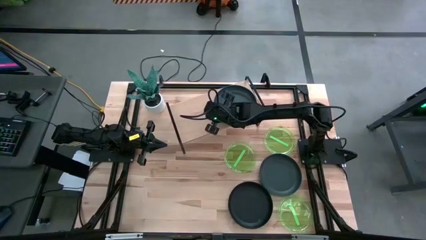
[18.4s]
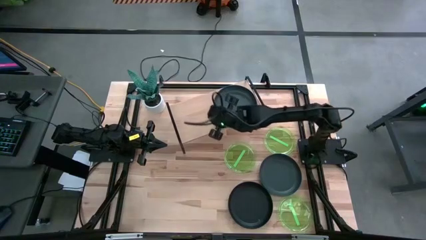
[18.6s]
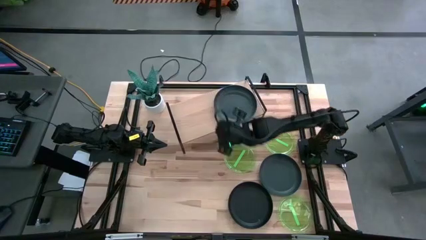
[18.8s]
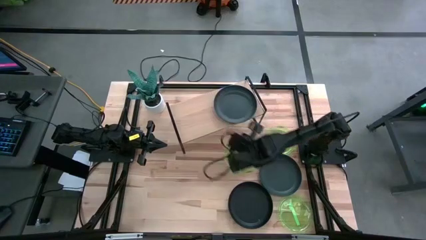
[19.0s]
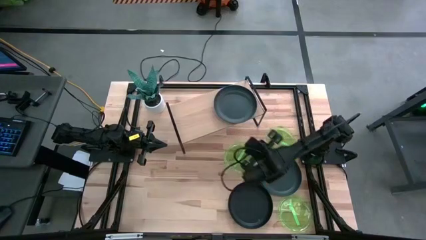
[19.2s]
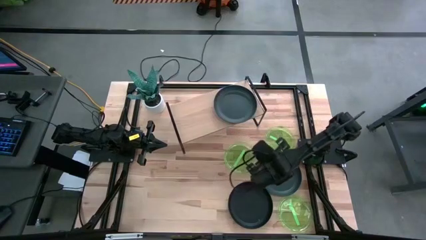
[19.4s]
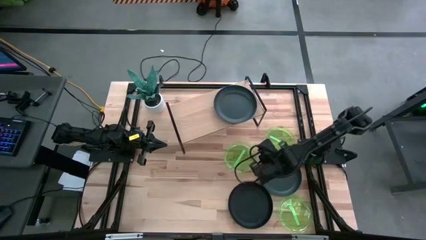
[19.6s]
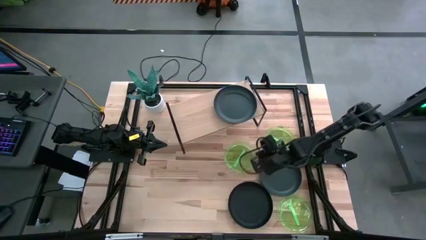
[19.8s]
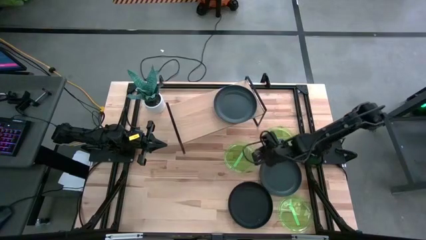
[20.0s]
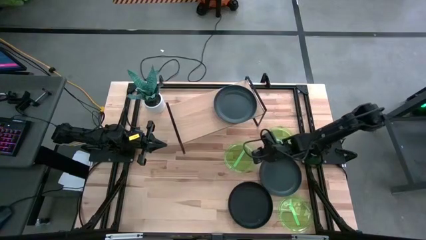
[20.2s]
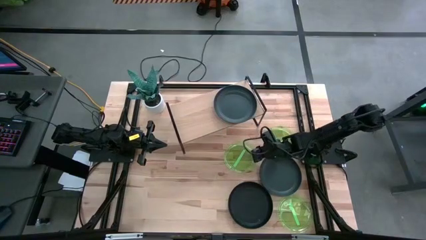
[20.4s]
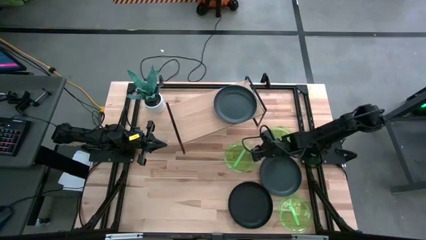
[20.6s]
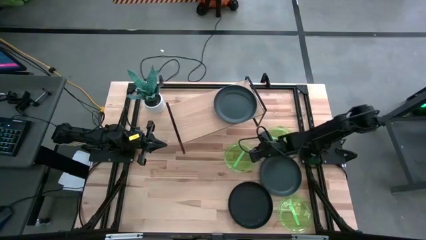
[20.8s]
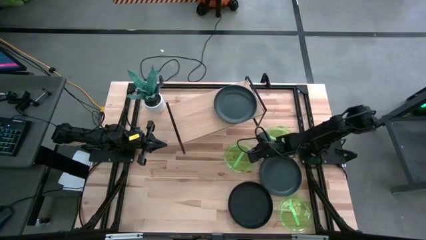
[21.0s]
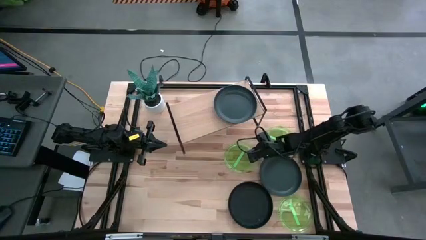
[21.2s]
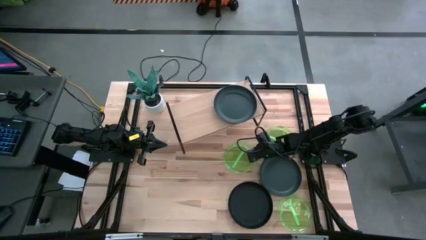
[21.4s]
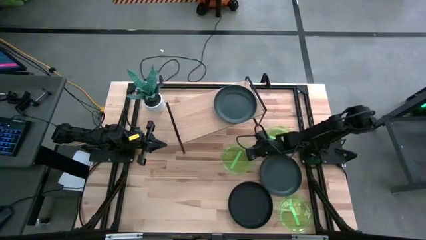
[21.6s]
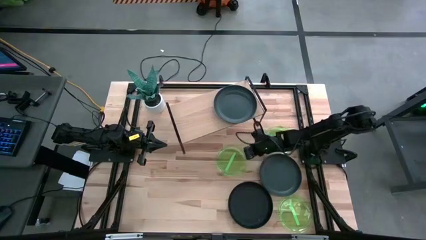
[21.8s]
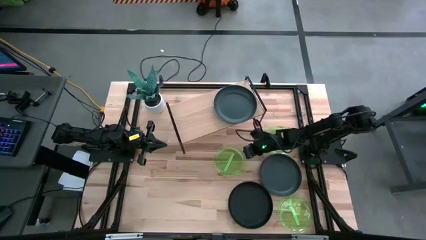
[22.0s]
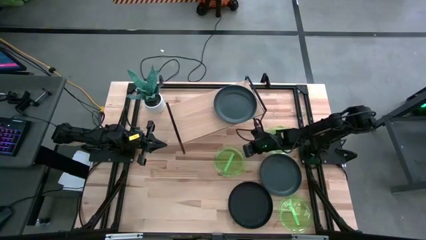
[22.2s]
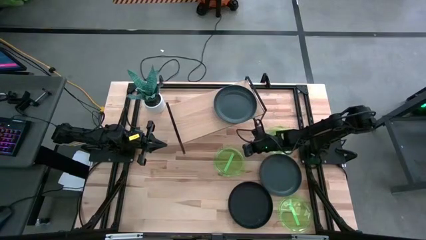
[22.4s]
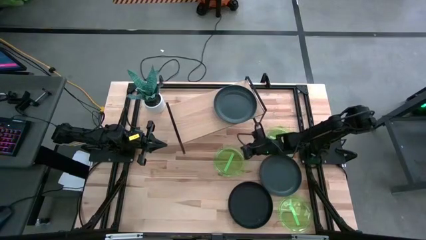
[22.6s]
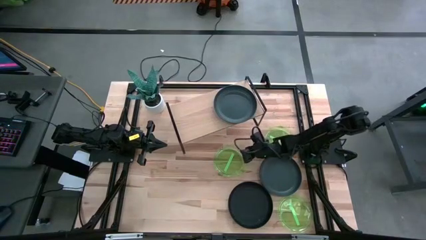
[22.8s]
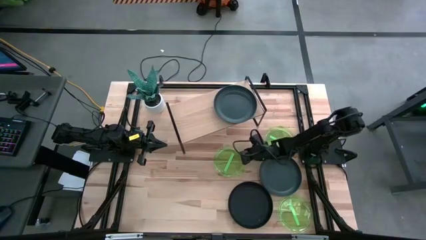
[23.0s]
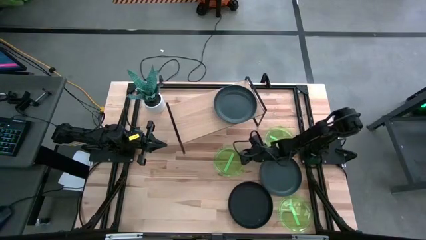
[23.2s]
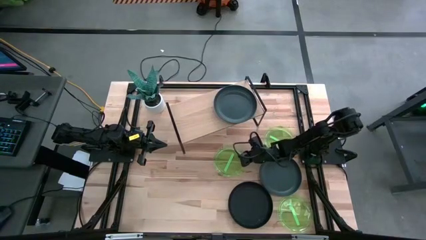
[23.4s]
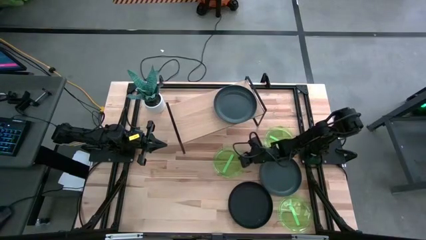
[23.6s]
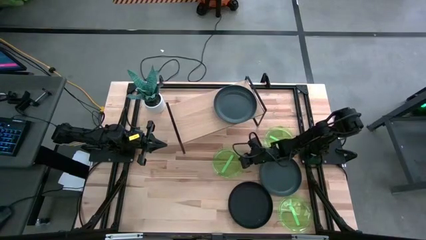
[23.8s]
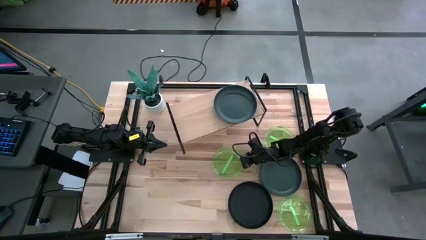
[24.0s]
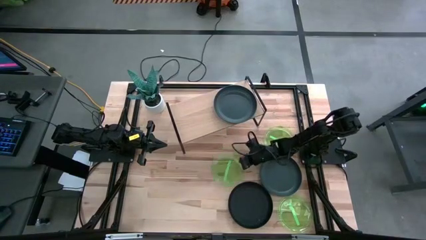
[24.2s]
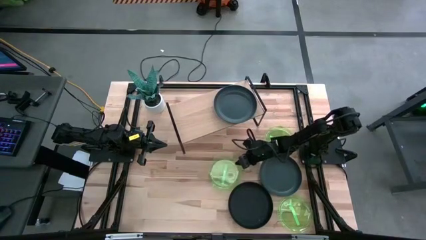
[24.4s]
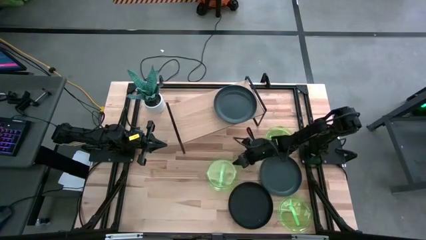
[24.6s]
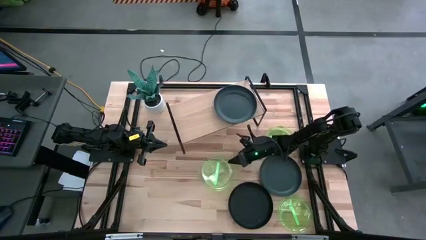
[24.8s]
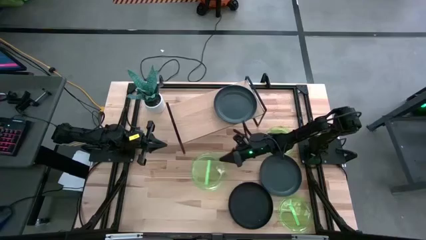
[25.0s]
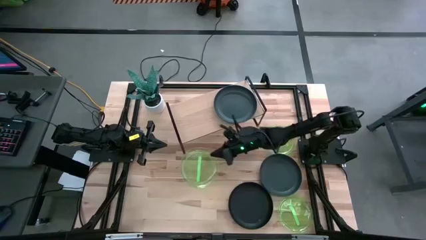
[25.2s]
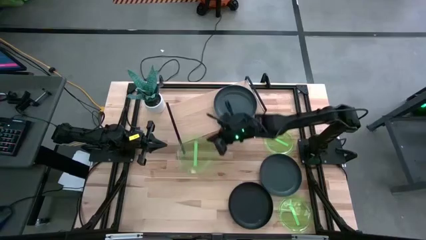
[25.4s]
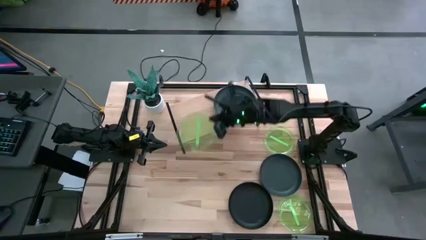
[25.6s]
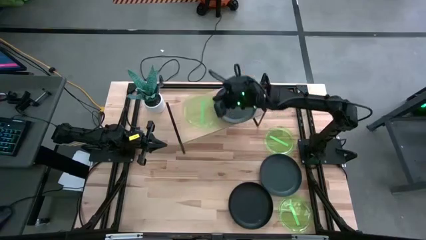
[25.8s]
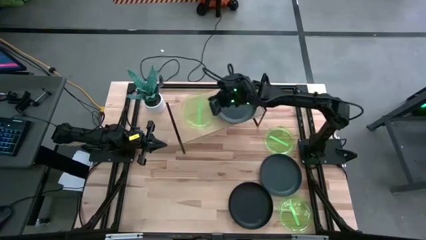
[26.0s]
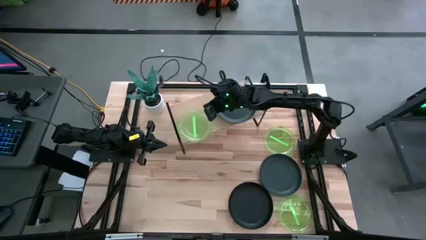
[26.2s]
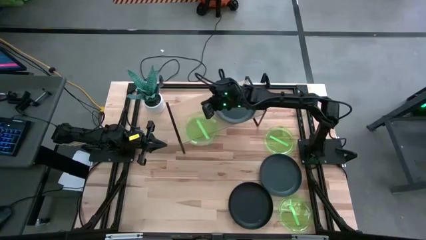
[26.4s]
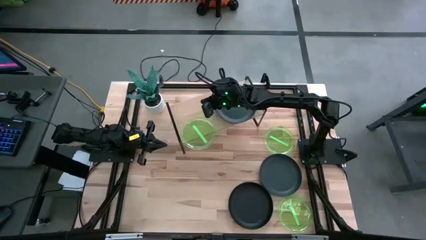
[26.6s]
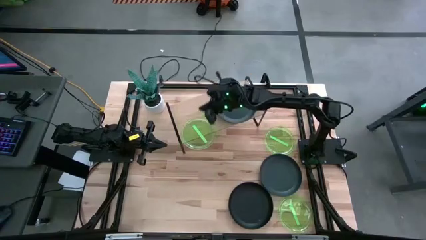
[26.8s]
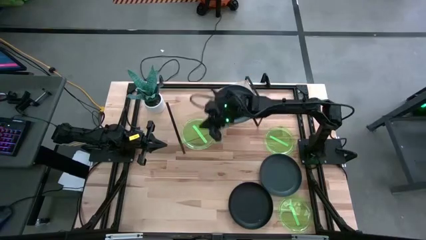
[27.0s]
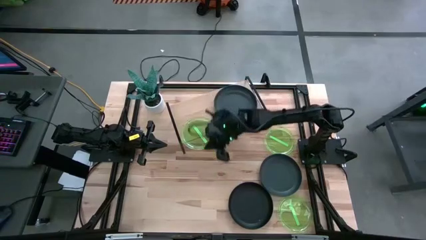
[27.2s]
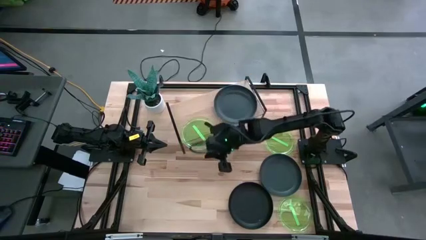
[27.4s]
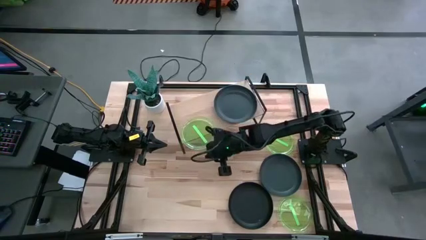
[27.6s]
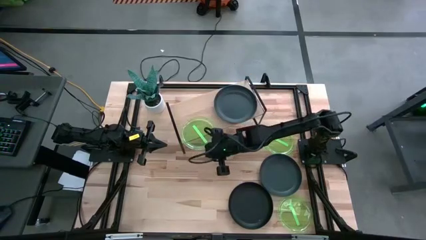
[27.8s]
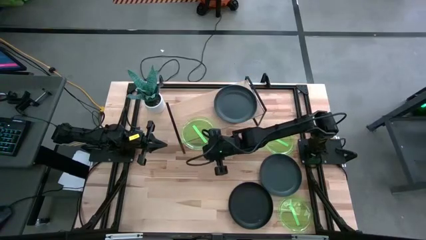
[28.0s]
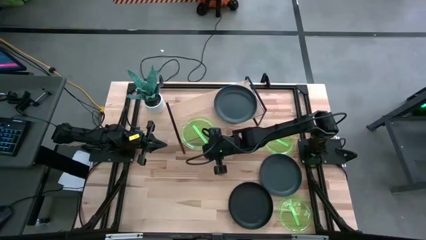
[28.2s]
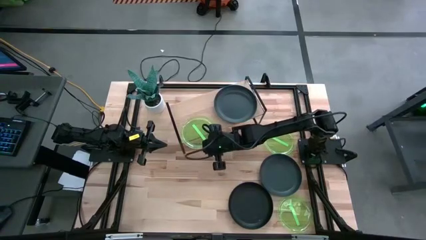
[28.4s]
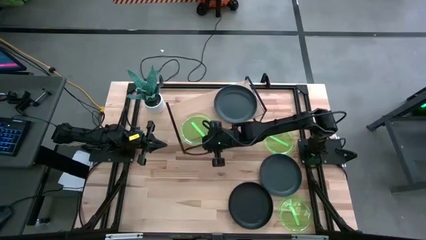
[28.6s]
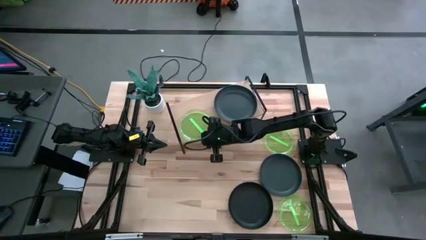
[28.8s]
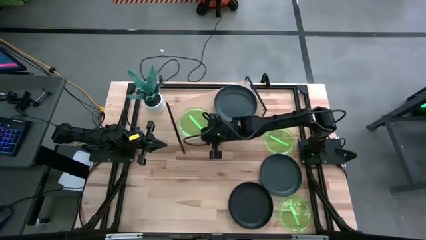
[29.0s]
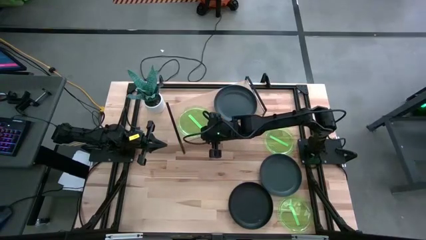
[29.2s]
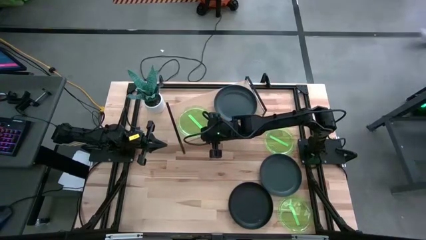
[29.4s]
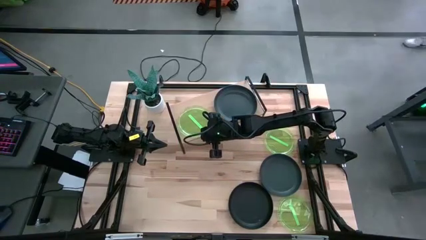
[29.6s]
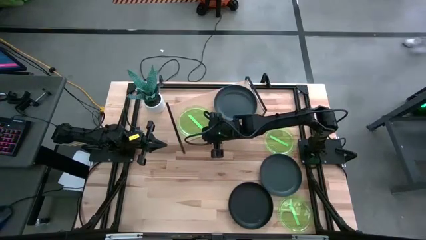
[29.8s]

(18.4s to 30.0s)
Task: Place and stack plates onto a shelf
Put the middle green plate on the shelf

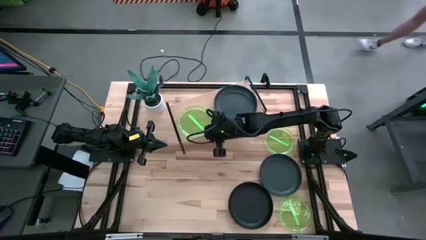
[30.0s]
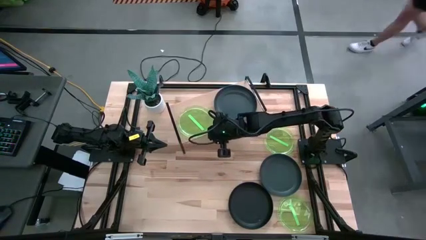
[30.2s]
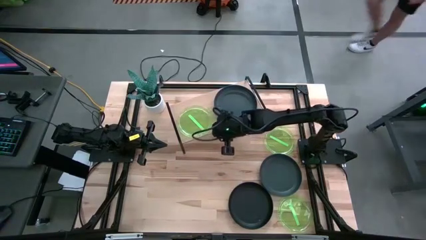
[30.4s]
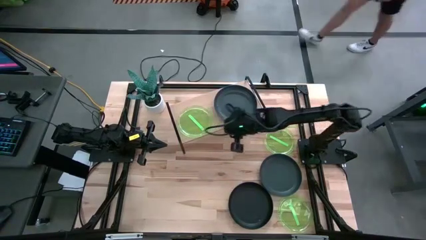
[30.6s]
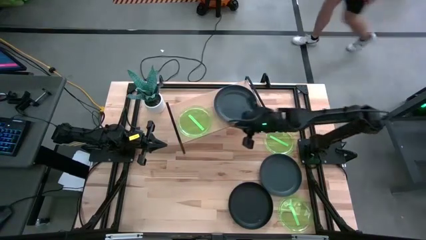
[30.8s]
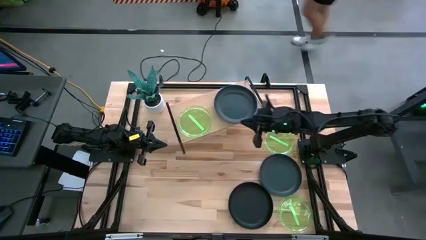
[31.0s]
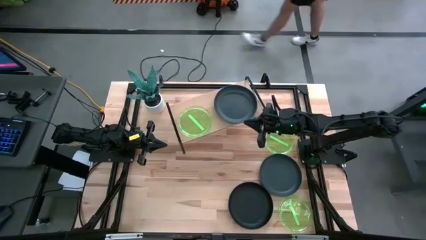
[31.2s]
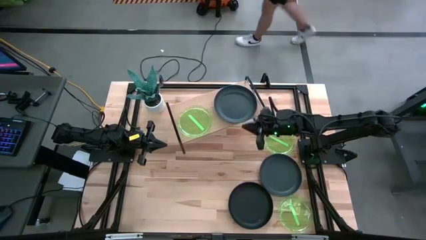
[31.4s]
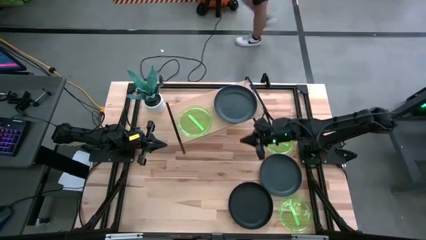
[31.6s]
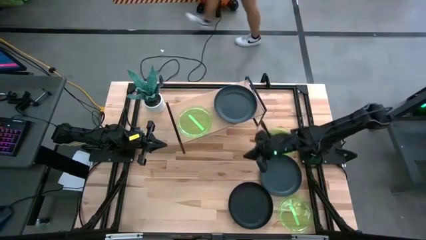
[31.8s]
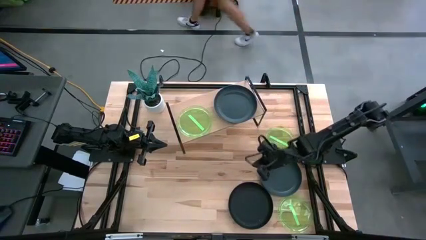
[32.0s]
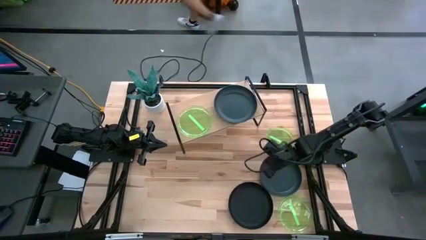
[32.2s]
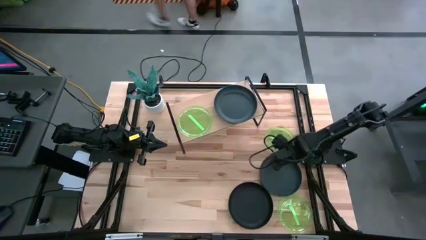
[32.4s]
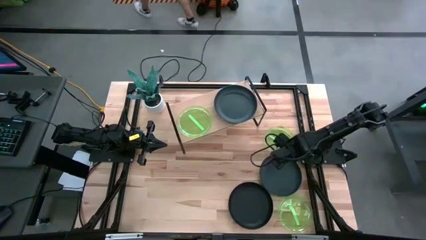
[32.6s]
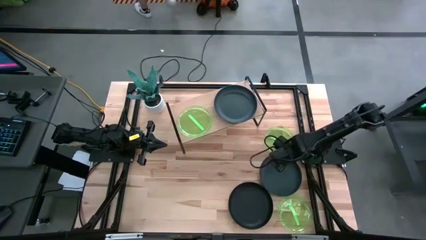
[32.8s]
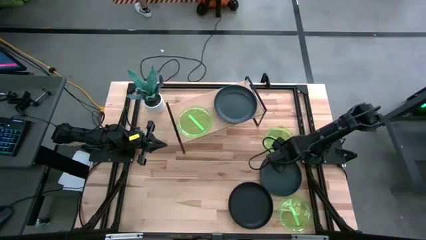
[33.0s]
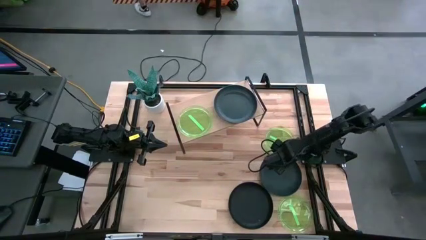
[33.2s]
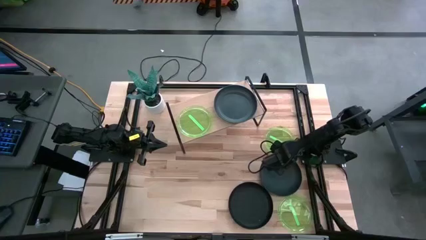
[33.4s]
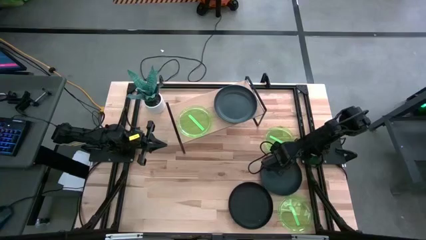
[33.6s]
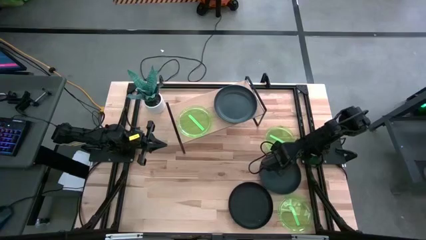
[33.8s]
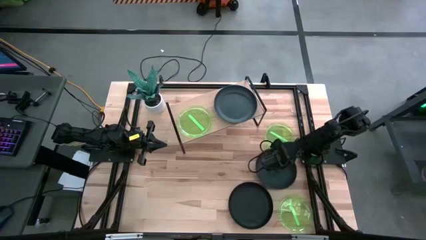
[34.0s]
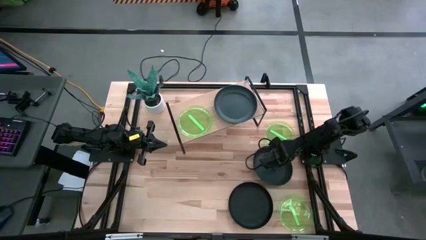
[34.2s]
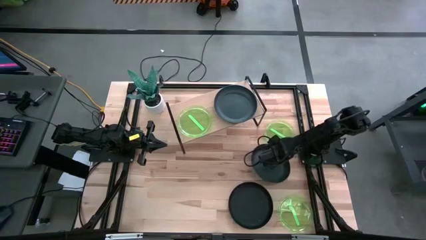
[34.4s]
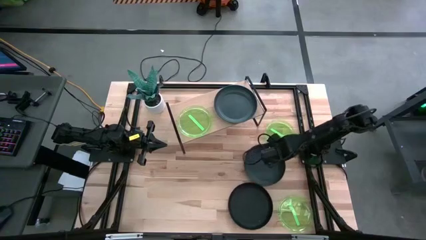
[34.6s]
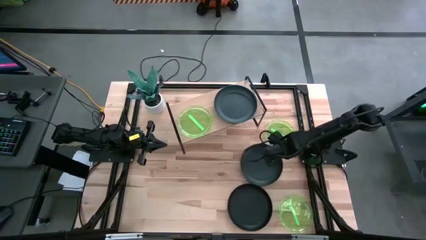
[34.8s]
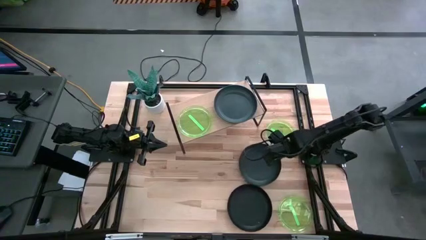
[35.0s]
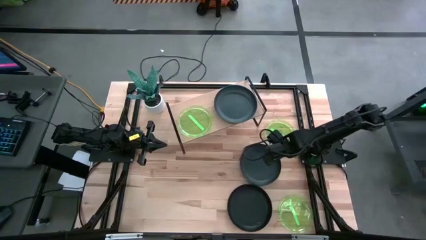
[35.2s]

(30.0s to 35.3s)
Stack the top black plate on top of the black plate on the shelf
